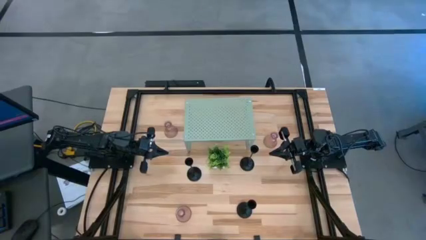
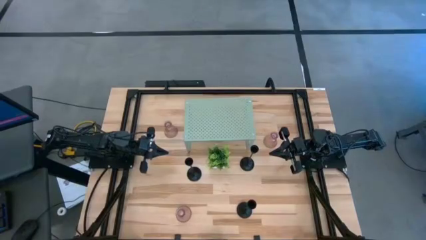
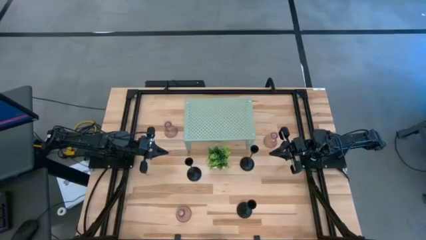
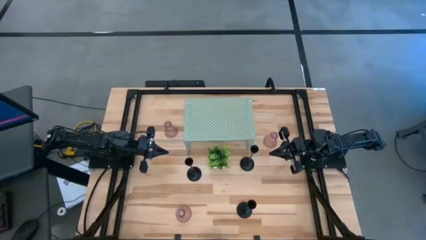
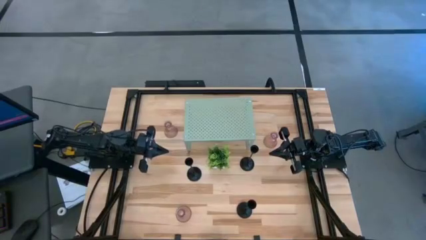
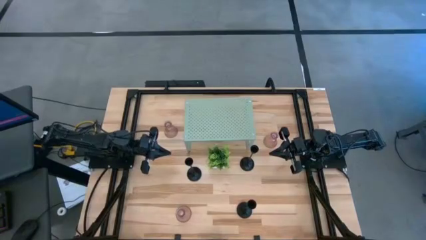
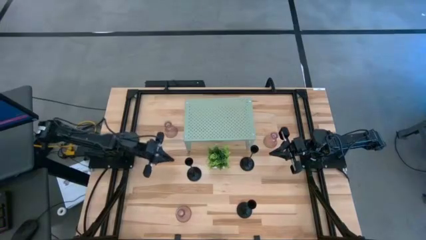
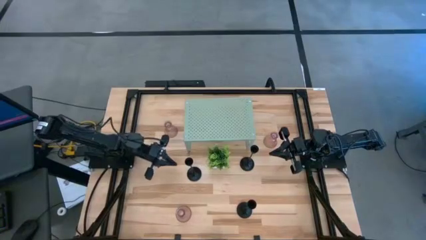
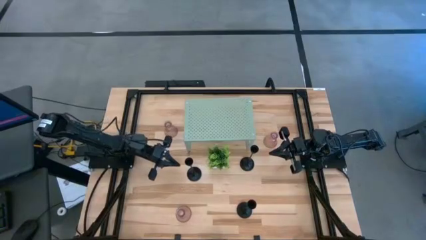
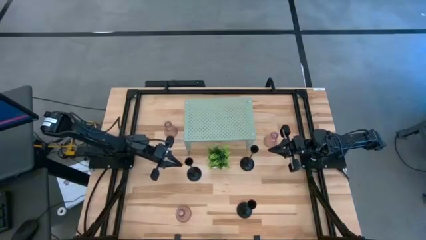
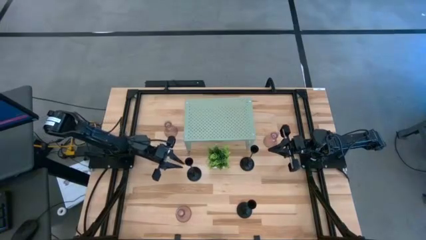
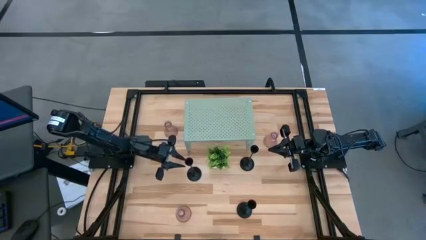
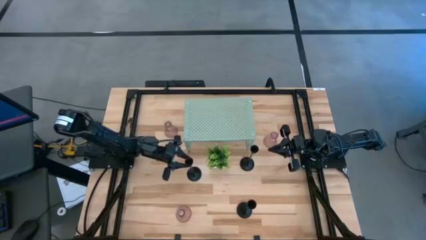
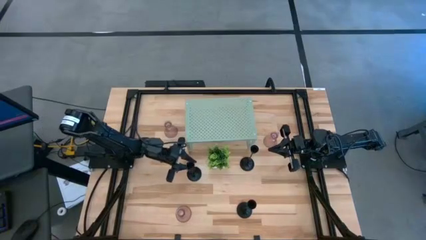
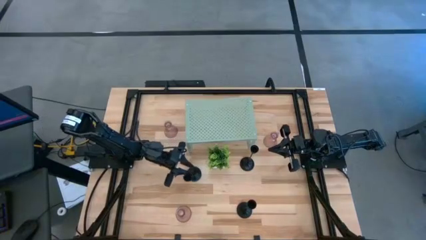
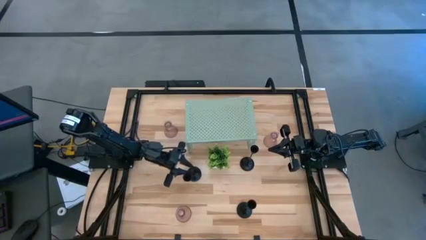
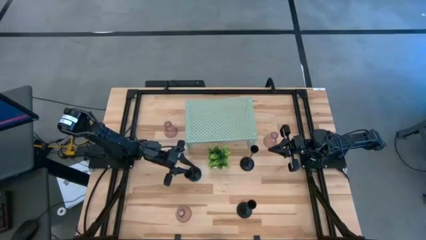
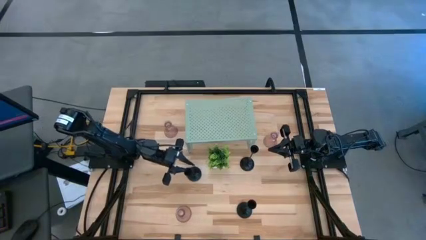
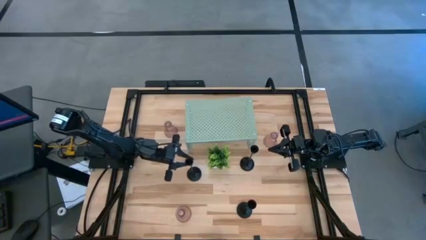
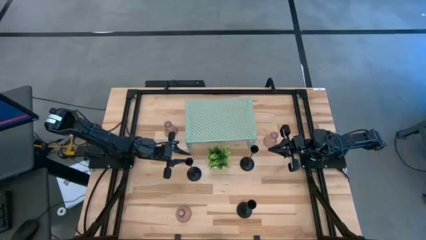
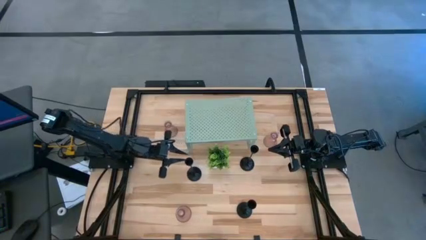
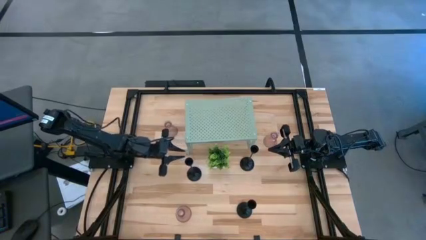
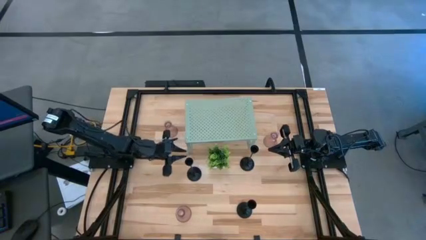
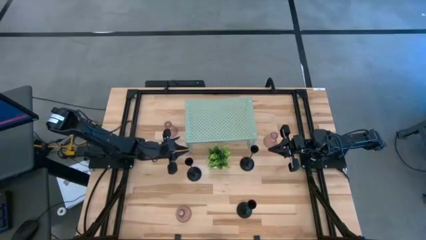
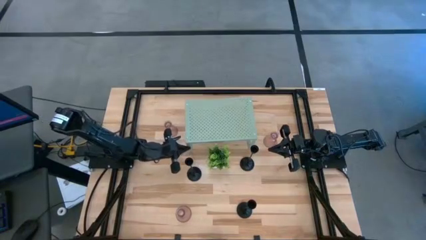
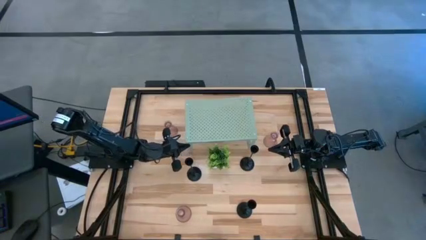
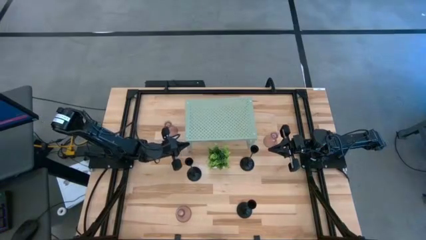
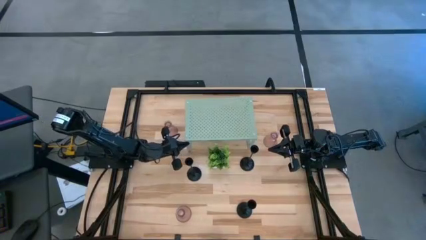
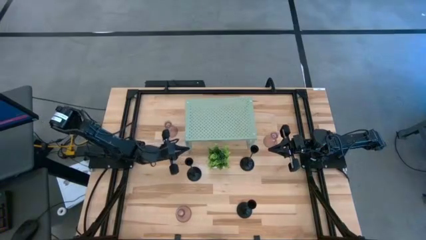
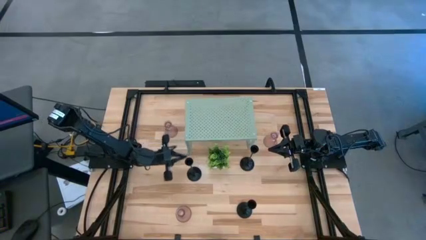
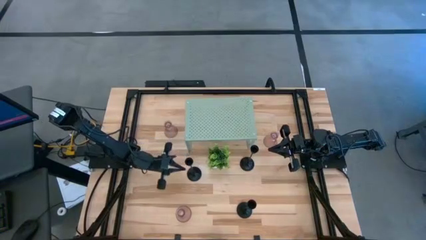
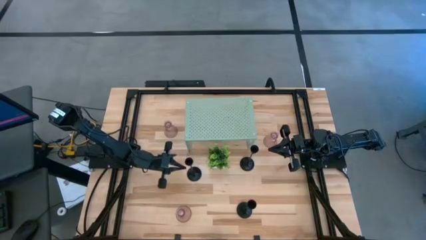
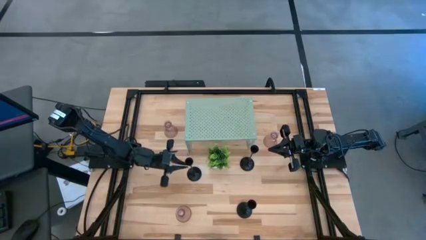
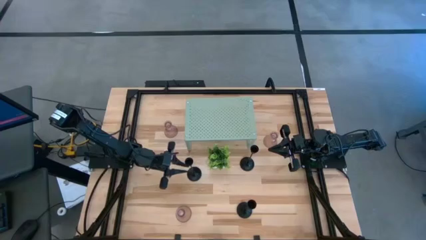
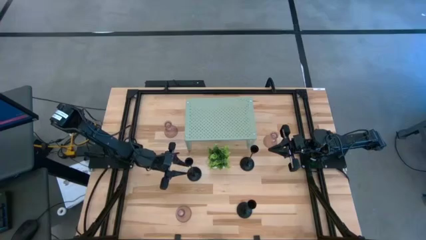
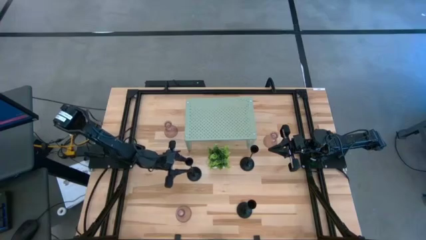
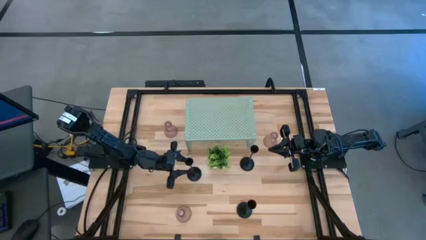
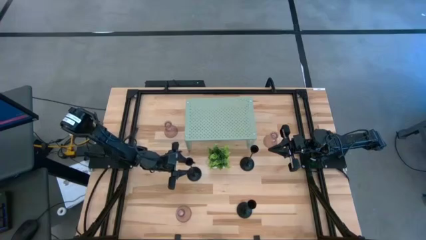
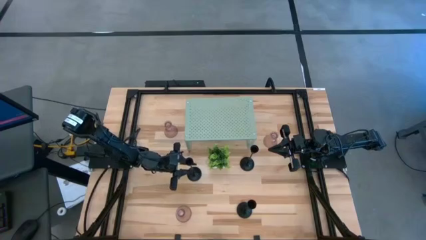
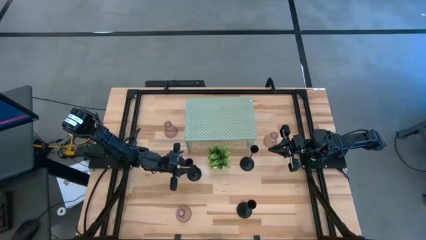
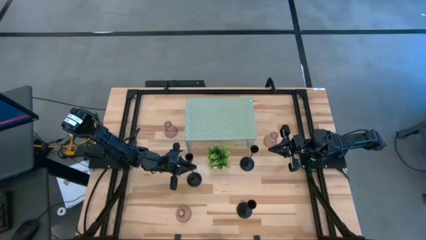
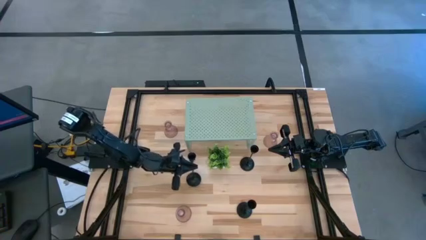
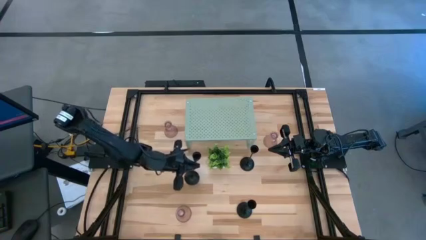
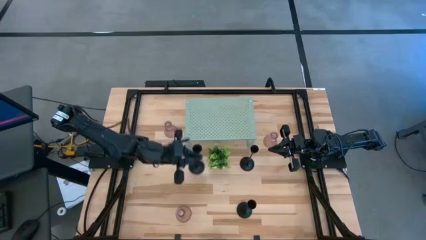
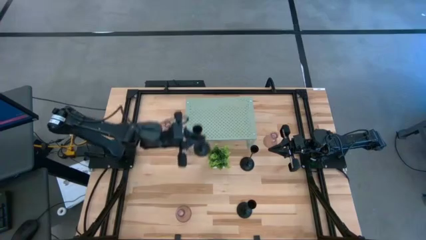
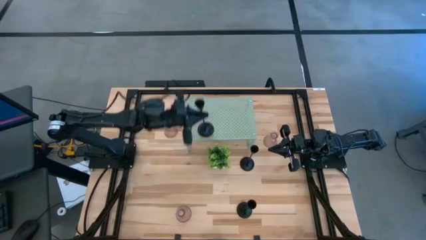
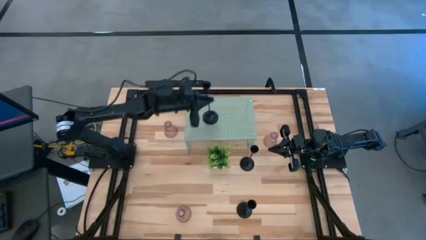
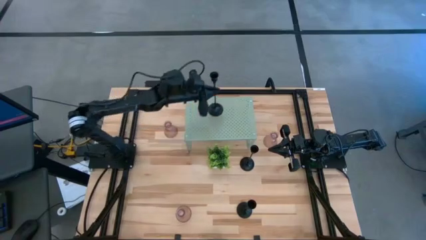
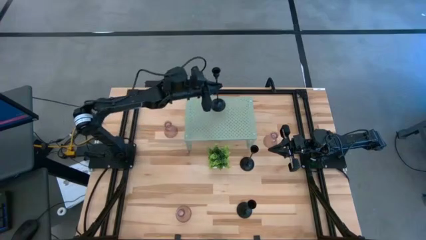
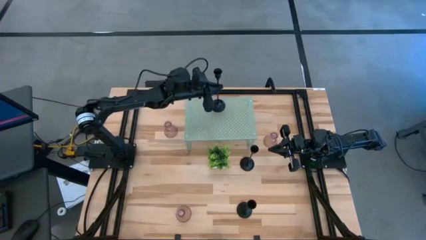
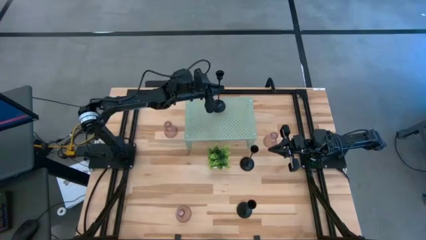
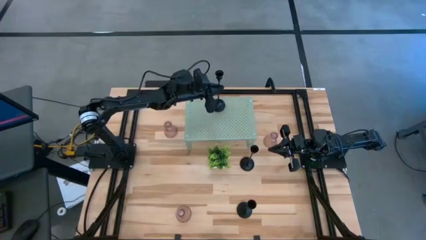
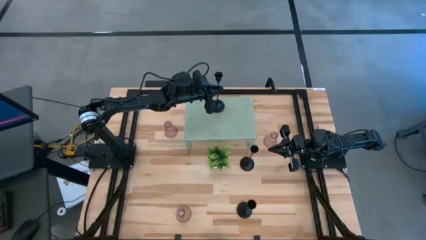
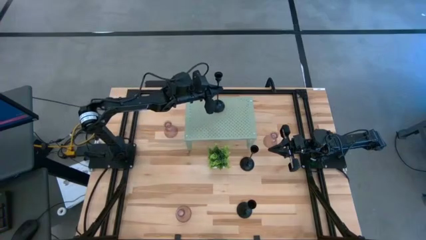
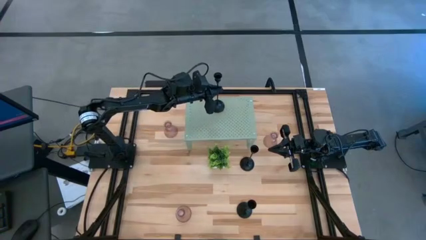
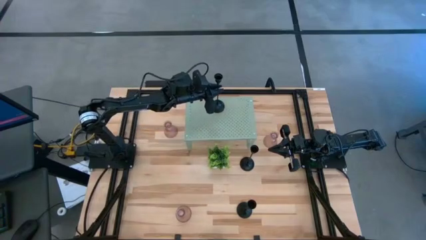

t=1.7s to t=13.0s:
Task: Pick & Place candle stick holders
Put the middle black candle holder on the shelf

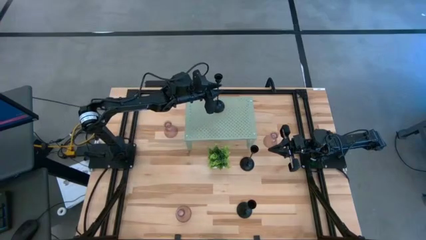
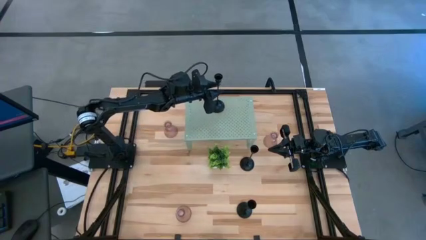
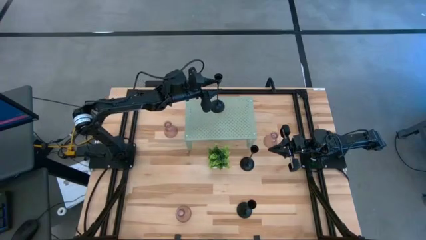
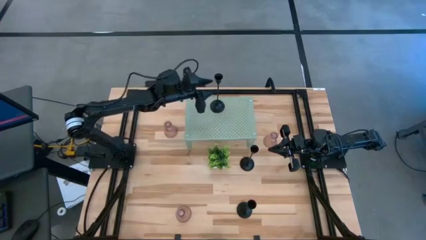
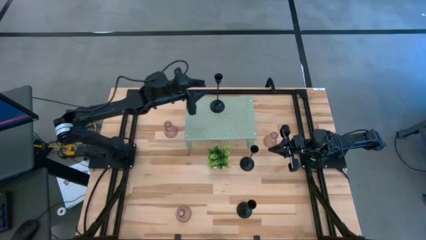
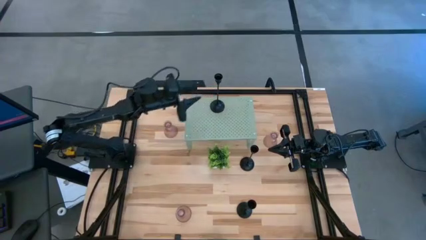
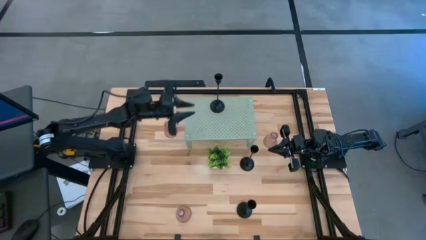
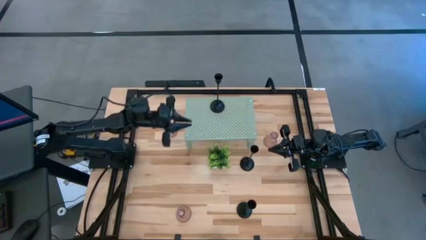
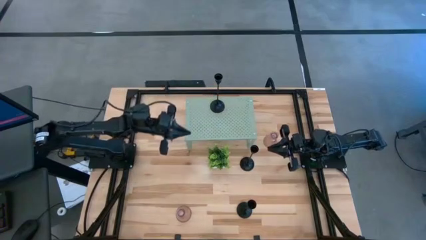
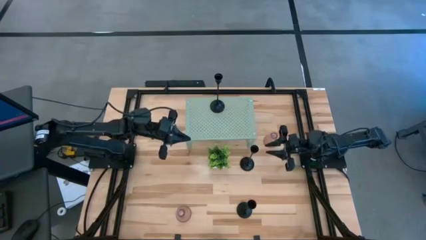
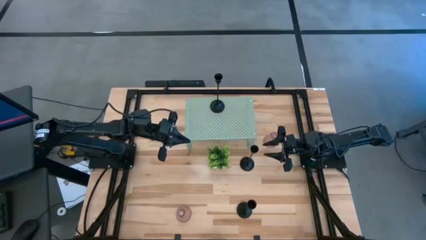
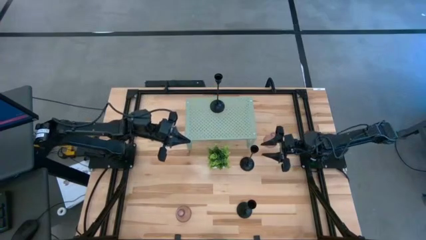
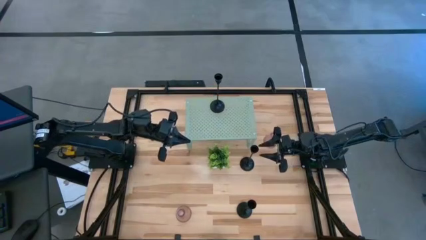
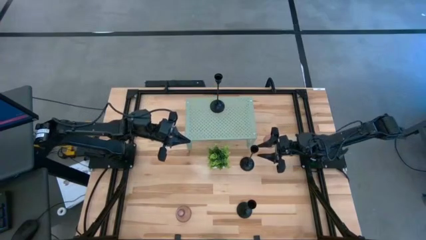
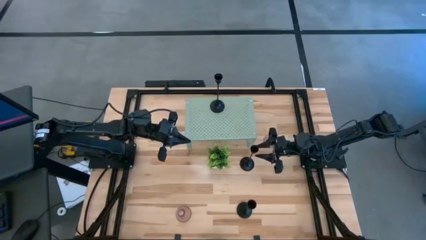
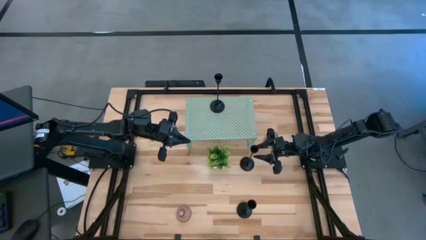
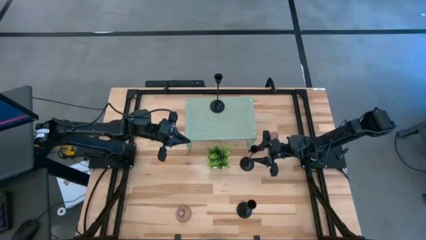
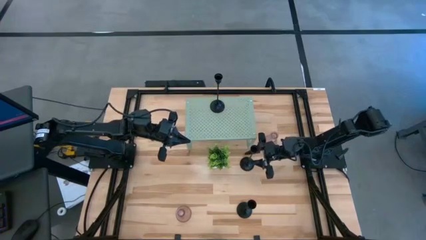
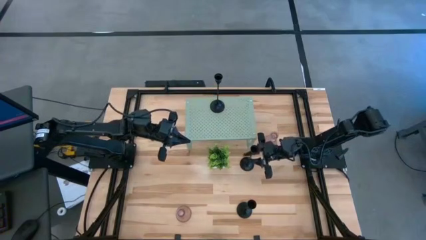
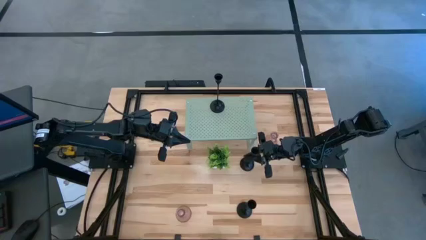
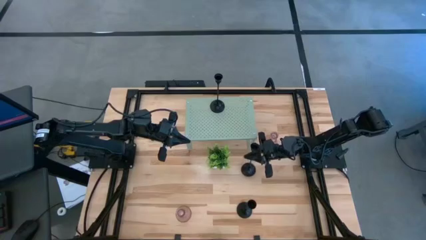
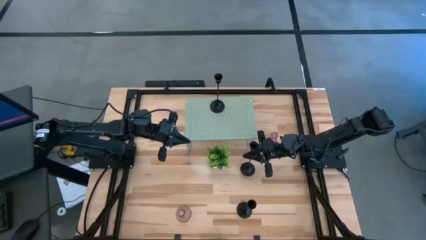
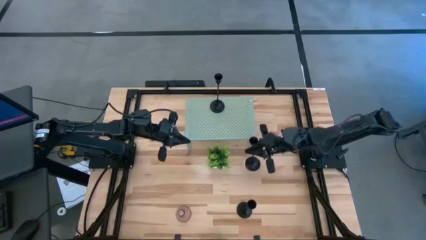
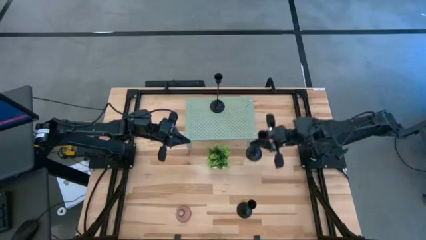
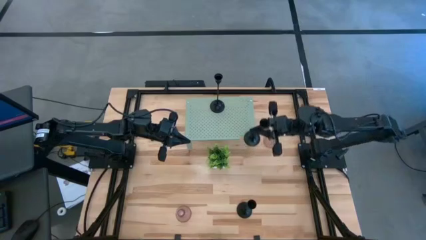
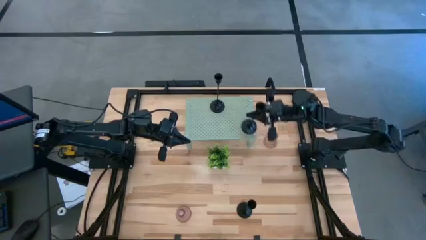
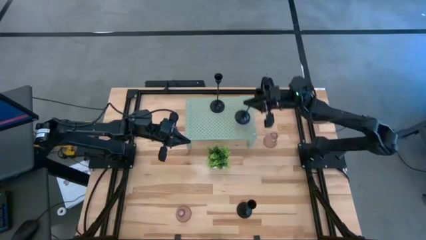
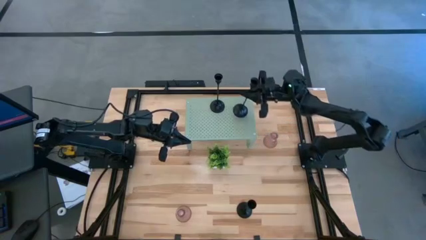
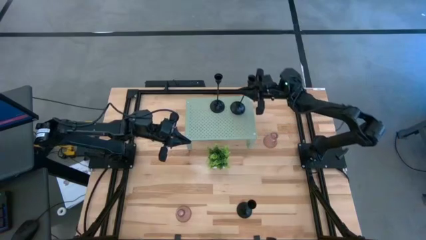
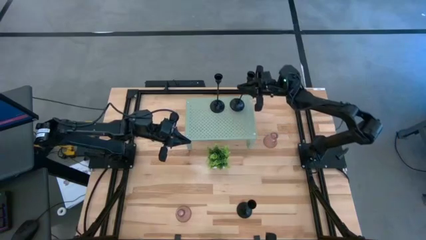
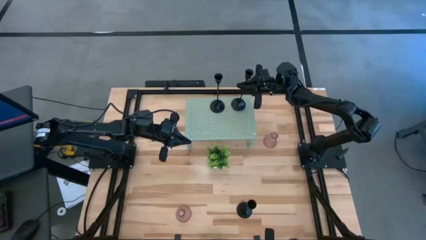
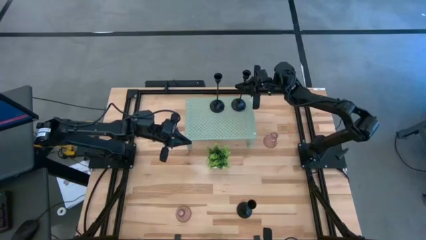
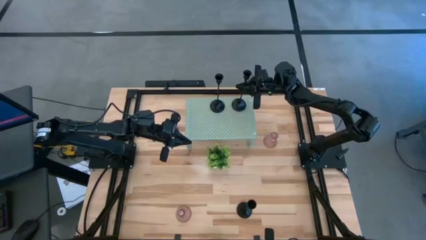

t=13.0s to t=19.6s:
Put the top black candle holder on the shelf
